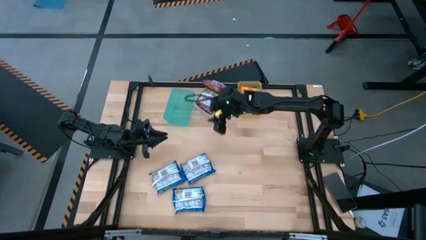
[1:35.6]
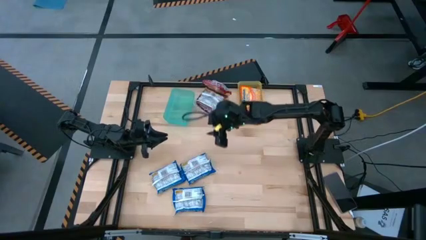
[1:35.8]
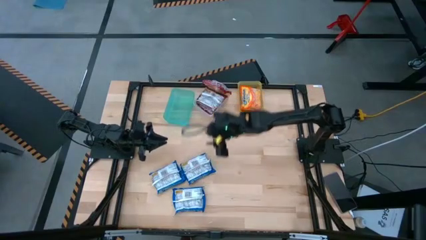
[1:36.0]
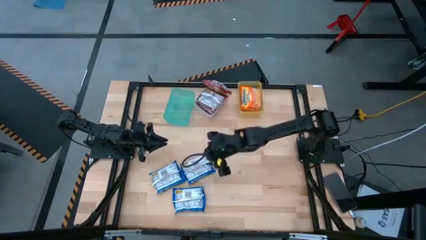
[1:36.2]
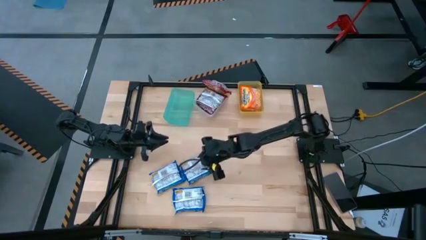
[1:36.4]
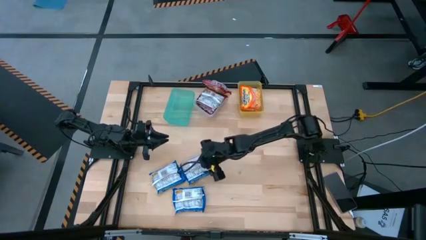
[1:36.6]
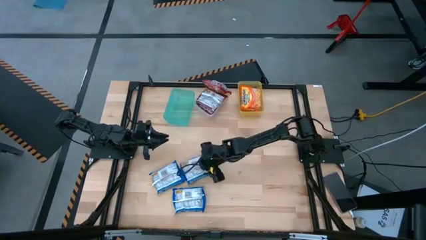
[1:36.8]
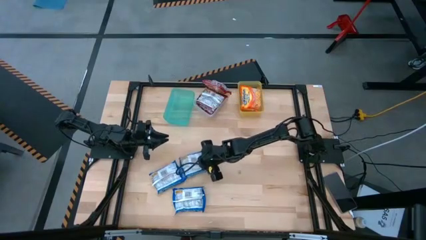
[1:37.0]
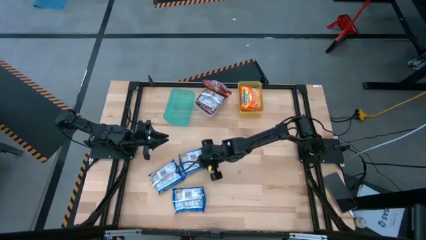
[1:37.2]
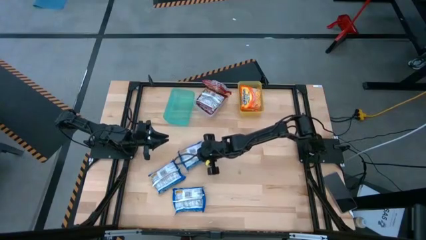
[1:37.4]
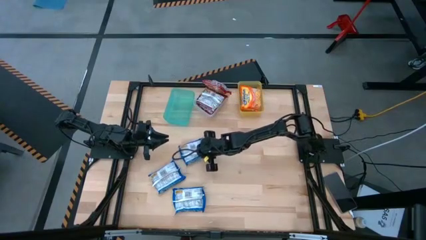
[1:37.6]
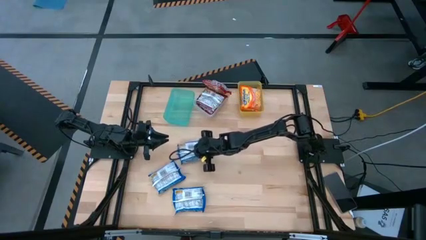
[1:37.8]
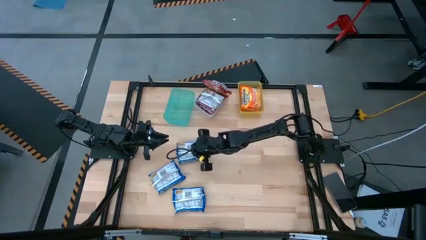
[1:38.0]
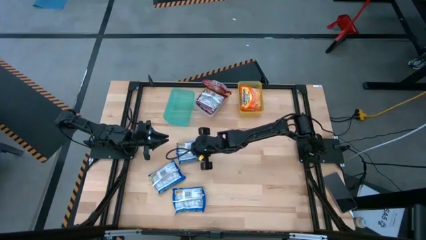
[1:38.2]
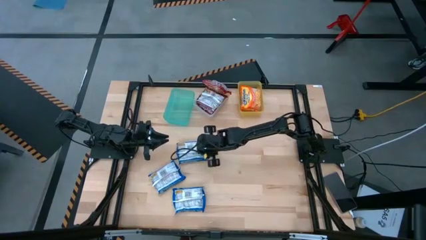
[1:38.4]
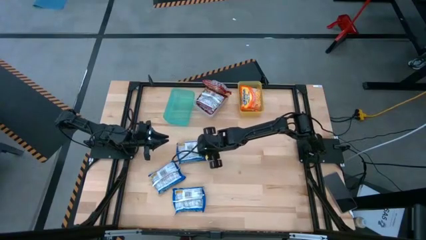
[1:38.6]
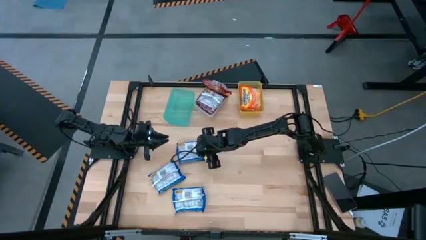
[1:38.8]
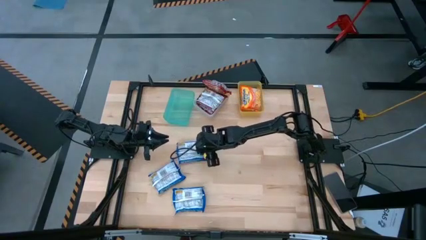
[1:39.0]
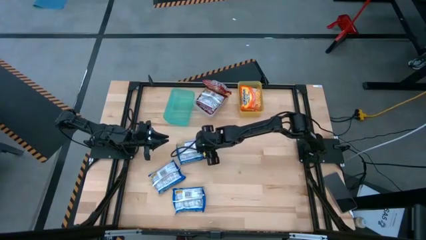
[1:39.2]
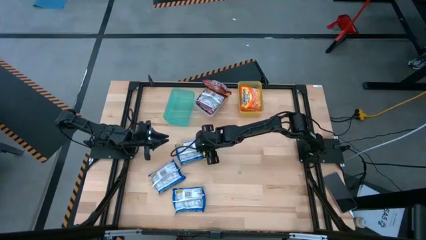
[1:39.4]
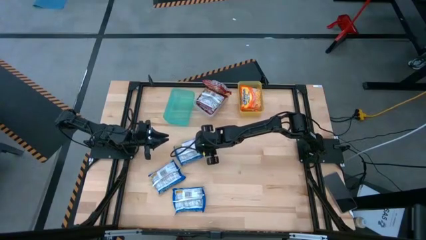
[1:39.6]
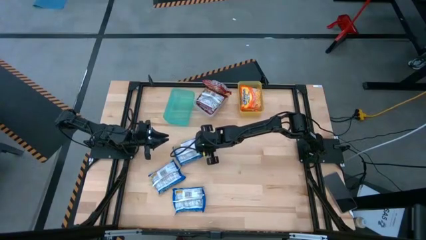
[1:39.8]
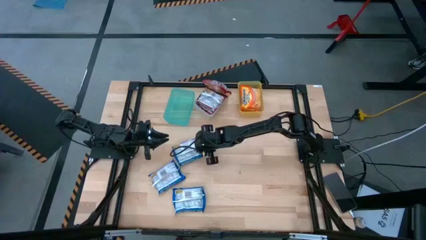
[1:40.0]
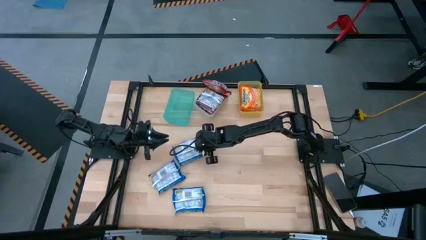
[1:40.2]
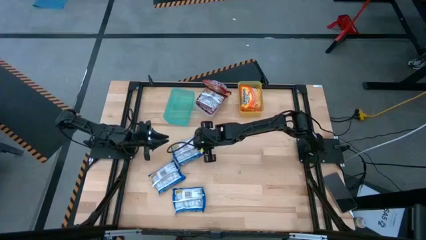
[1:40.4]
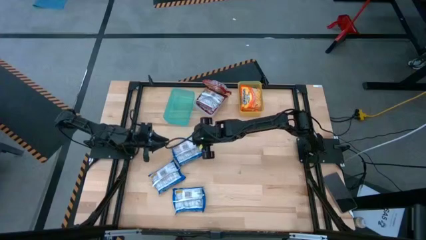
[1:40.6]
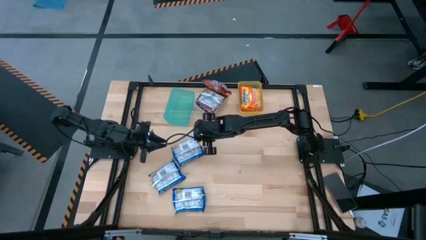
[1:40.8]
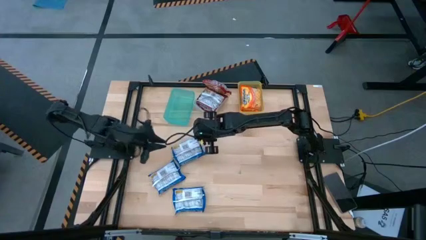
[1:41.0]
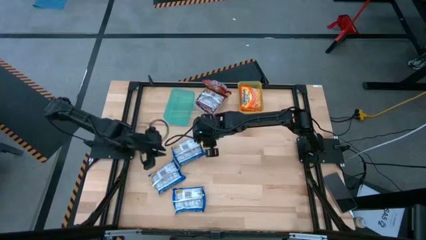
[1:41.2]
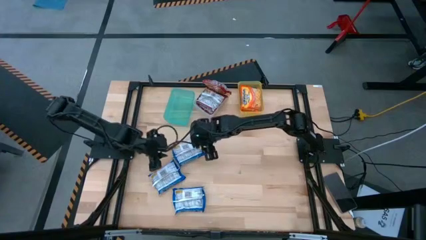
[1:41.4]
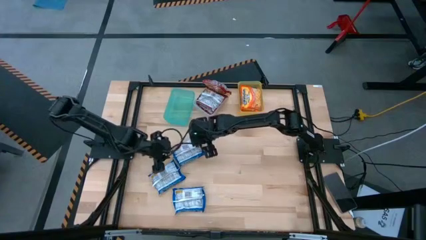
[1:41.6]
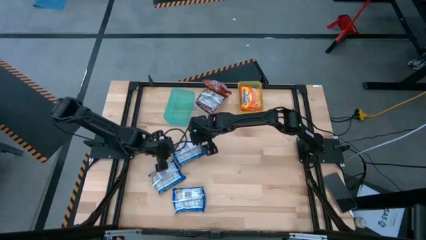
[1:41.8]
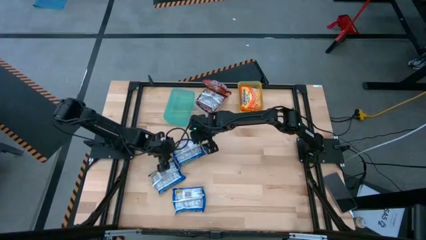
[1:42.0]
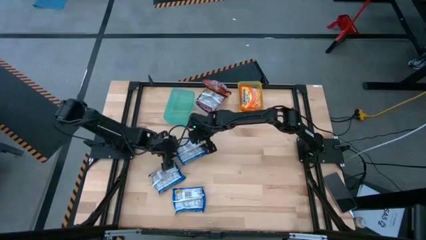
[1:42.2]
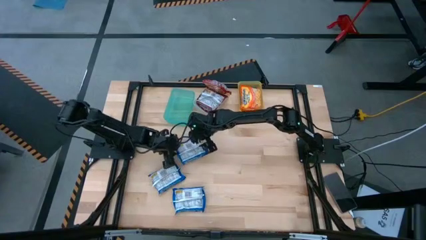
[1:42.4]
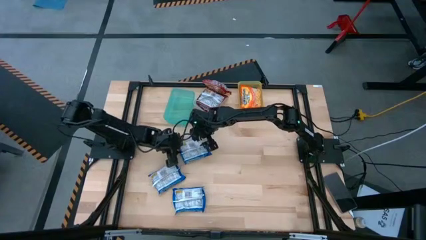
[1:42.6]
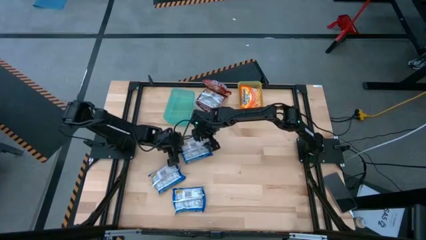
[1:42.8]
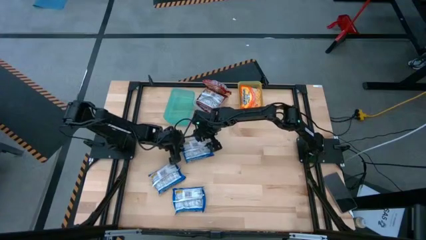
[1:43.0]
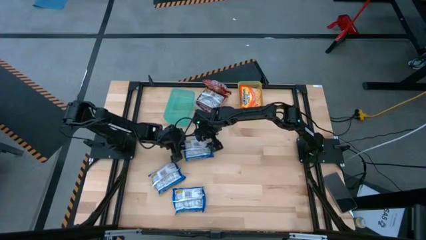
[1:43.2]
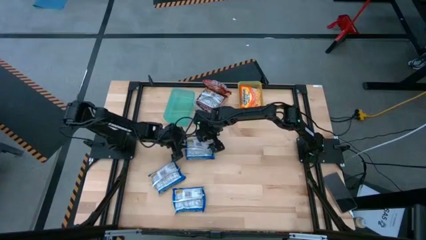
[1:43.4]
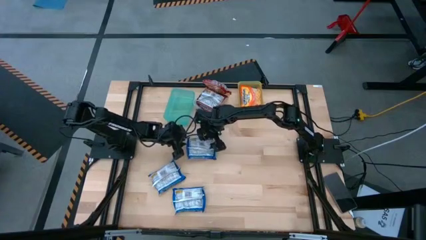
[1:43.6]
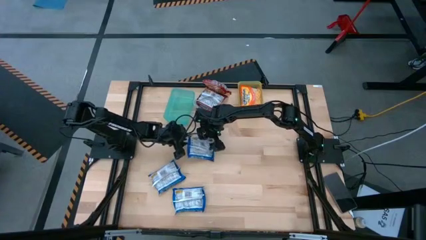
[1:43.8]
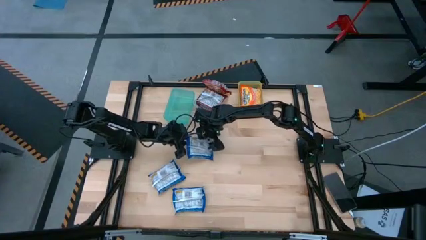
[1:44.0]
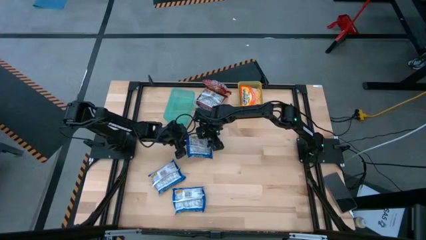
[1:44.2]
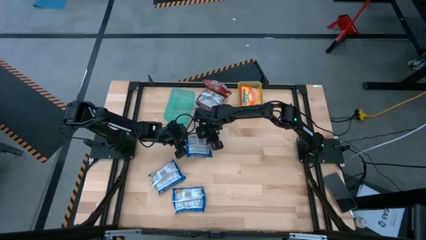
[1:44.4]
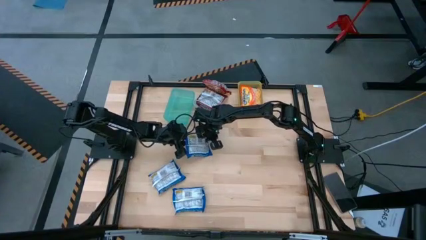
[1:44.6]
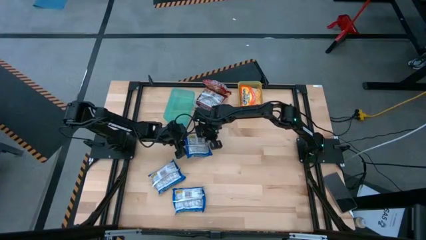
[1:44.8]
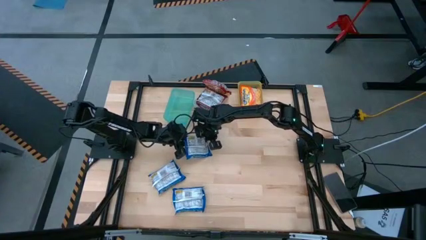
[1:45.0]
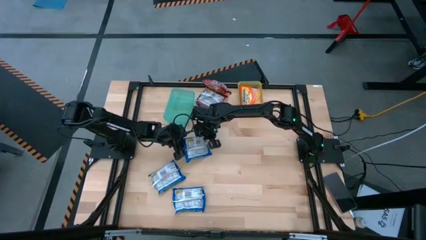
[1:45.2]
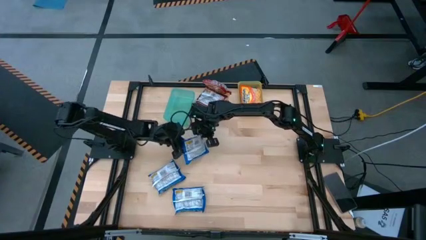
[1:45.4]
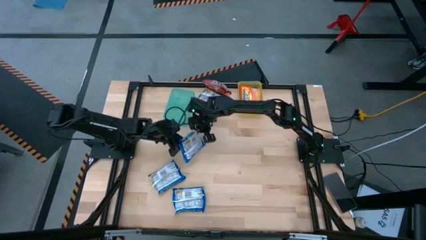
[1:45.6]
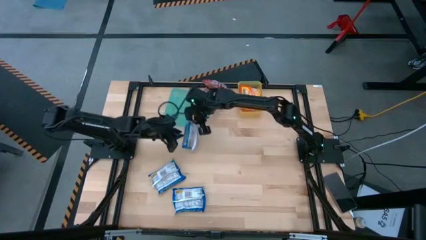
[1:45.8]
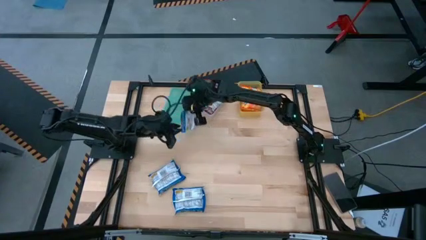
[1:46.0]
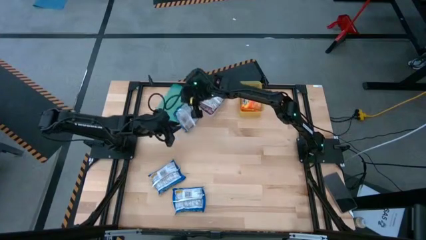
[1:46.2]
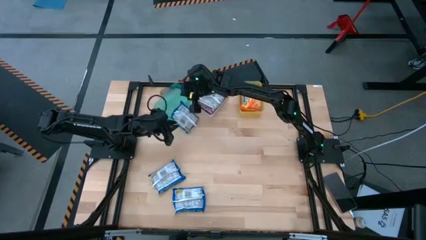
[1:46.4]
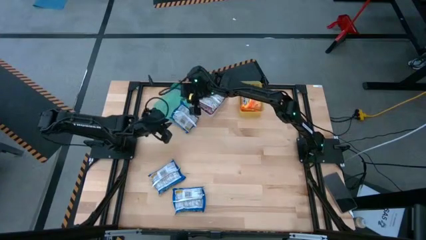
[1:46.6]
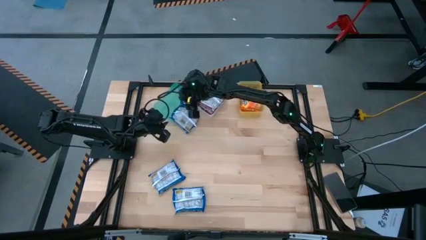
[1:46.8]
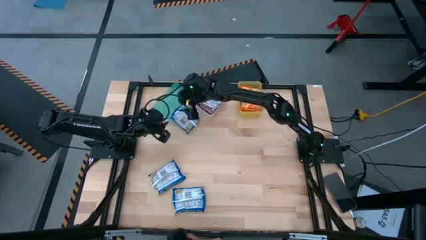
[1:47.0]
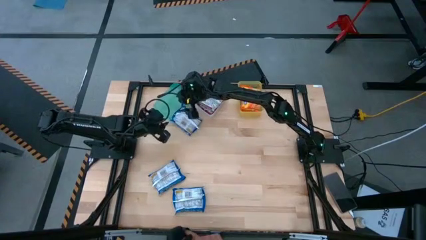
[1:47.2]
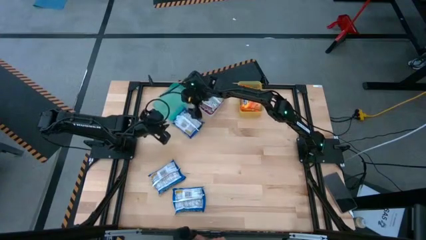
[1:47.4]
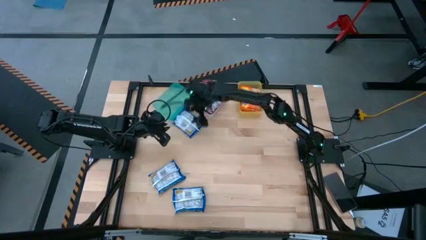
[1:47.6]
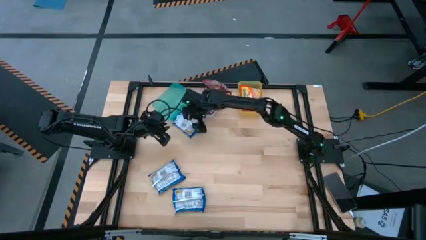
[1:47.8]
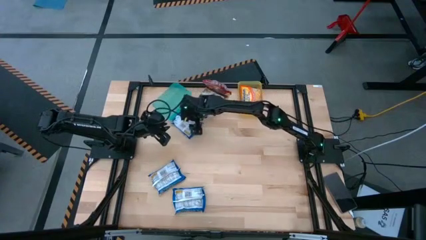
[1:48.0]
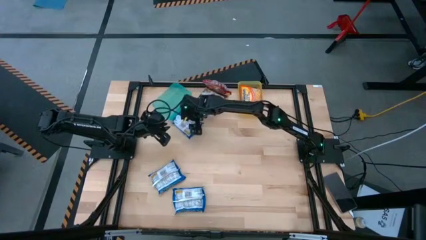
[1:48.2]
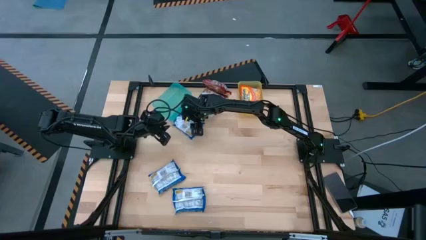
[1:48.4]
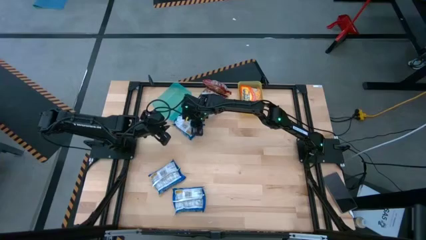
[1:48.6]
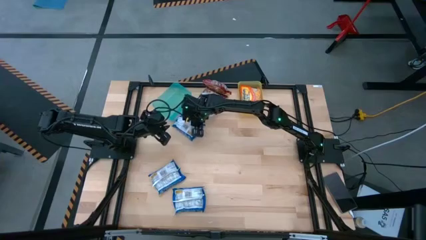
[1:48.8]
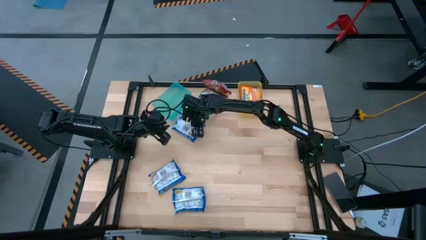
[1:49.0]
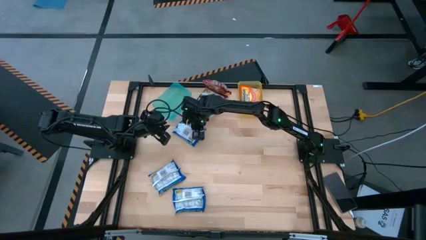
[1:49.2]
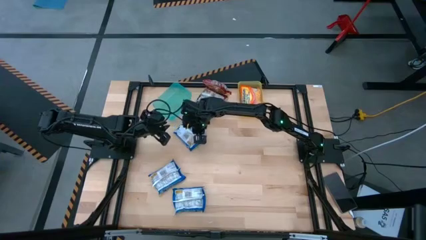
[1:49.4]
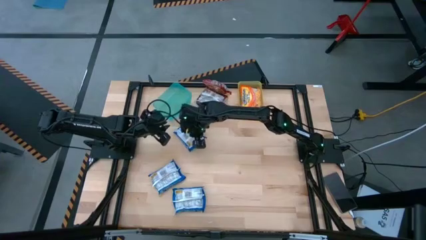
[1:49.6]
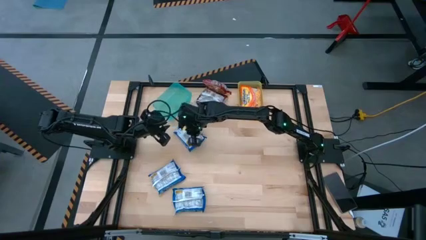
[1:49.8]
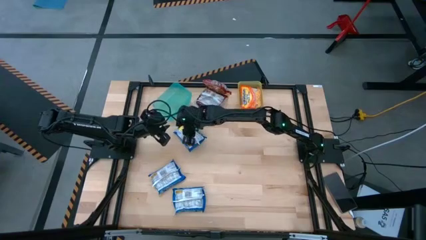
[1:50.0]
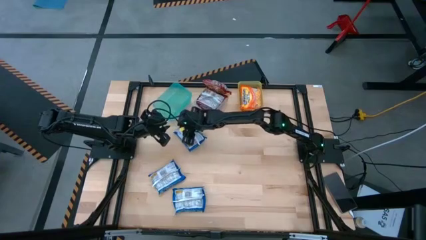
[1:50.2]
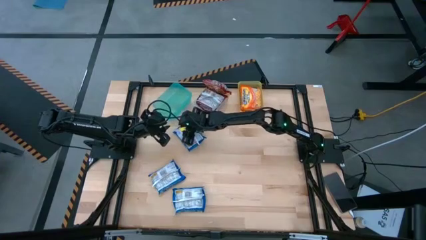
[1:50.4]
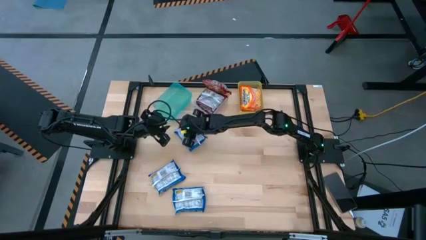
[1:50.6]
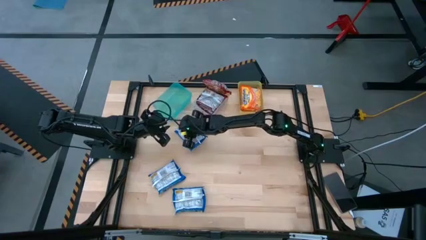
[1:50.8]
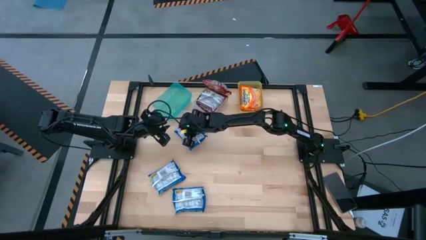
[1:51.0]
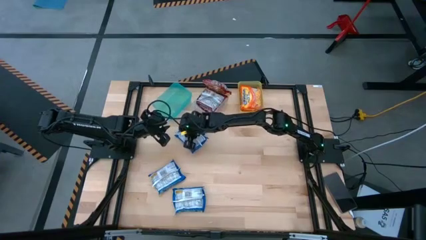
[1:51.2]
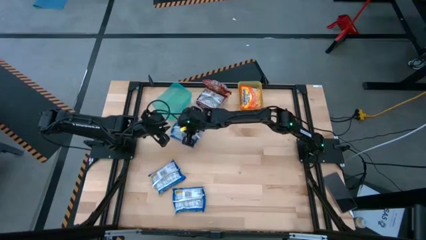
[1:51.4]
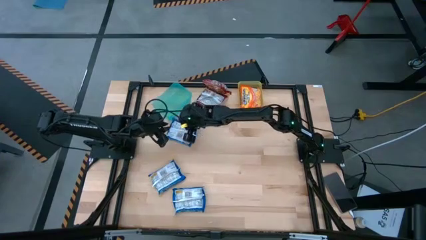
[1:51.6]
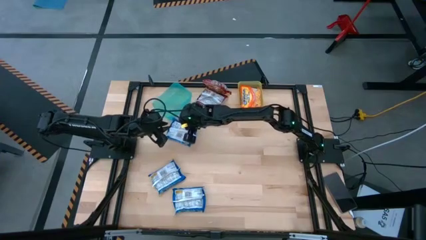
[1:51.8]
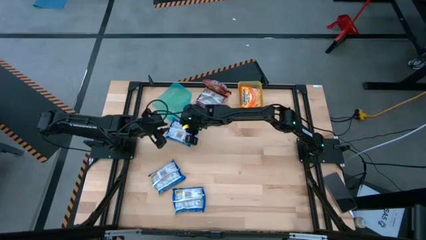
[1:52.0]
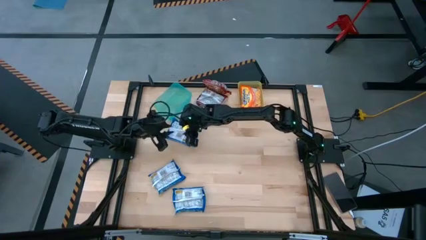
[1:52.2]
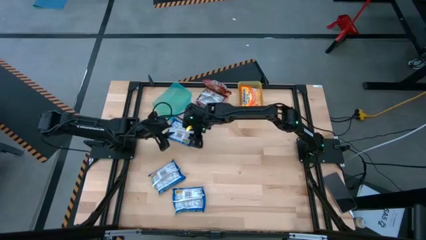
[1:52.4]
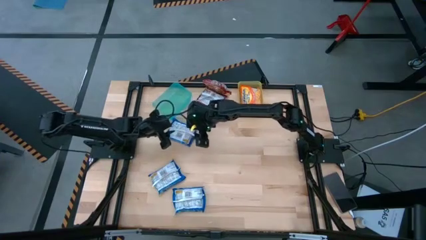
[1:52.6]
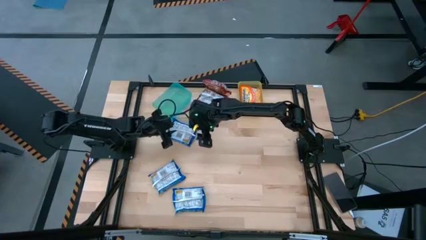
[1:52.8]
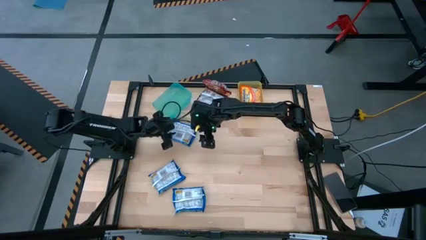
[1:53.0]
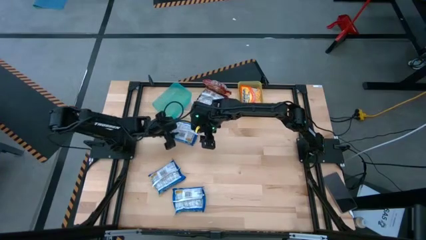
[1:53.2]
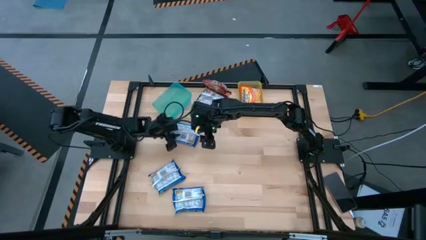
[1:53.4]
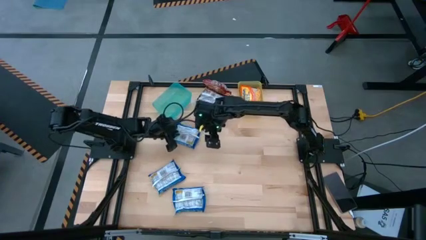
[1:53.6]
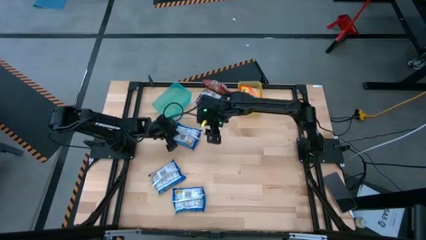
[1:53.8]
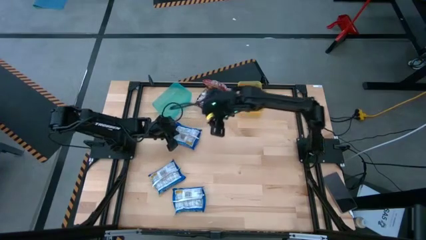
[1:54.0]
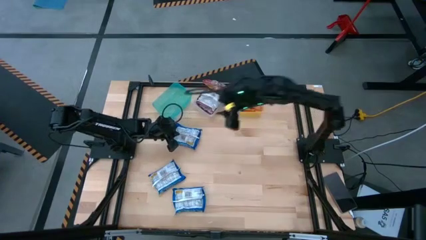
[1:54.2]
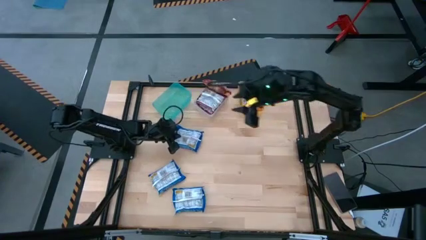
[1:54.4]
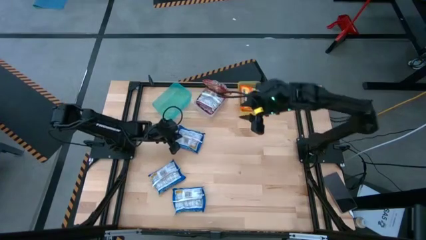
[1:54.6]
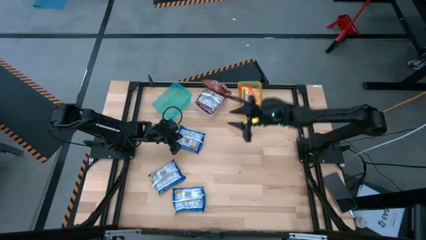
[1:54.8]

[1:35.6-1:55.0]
Task: Sort Maruchan noodles
Put the top blue noodle pack into the blue bin
